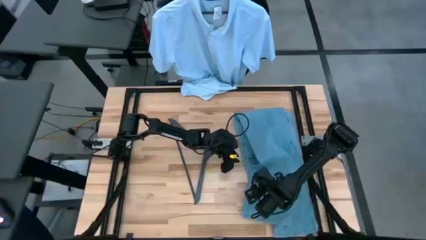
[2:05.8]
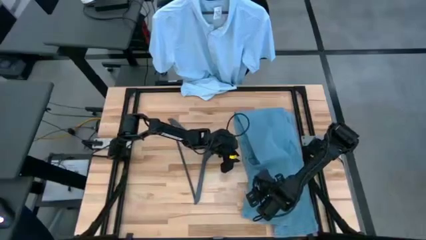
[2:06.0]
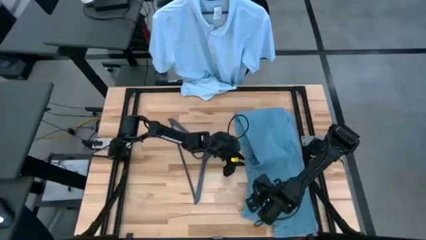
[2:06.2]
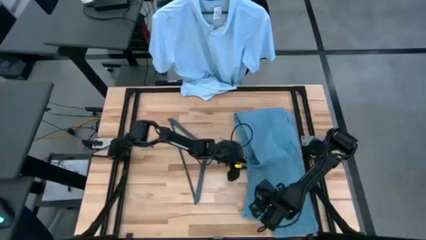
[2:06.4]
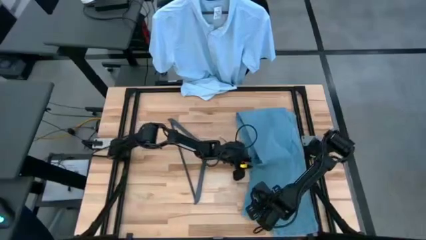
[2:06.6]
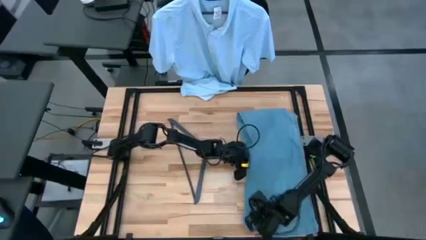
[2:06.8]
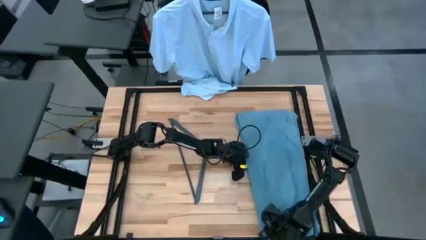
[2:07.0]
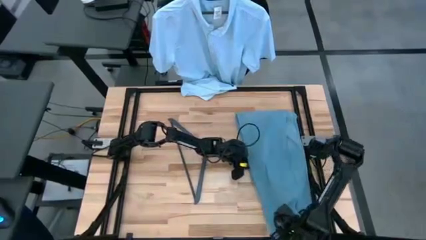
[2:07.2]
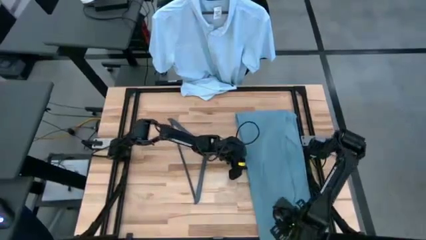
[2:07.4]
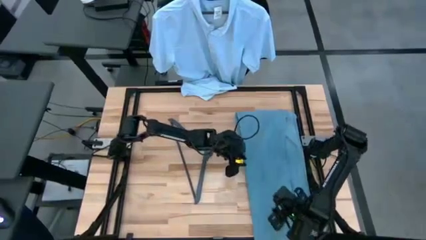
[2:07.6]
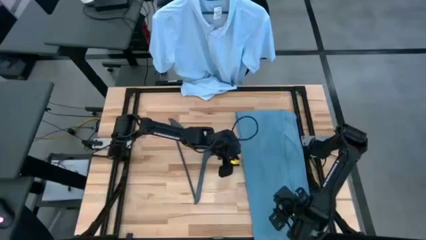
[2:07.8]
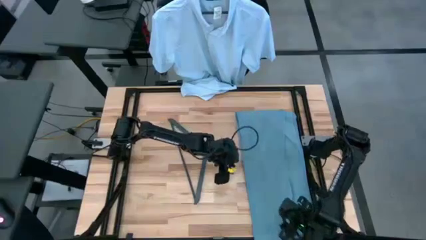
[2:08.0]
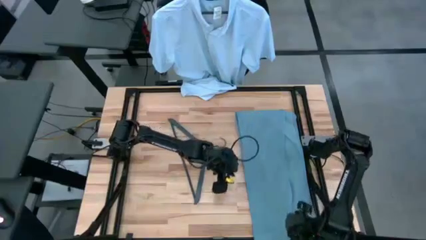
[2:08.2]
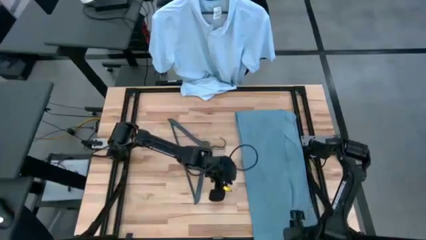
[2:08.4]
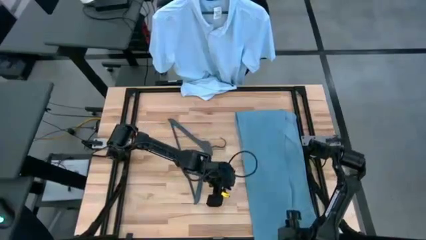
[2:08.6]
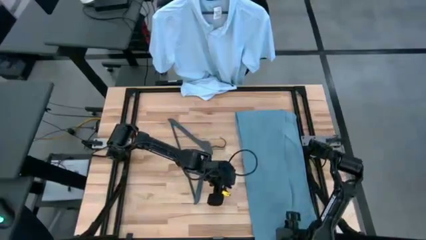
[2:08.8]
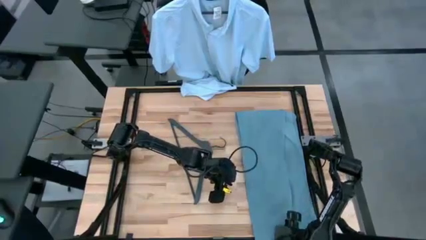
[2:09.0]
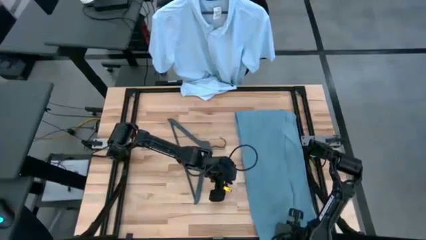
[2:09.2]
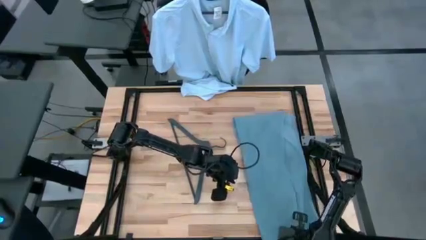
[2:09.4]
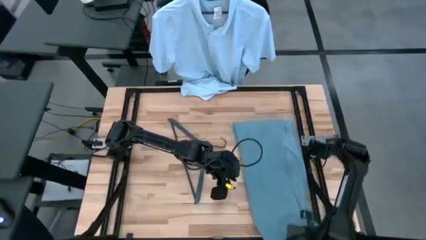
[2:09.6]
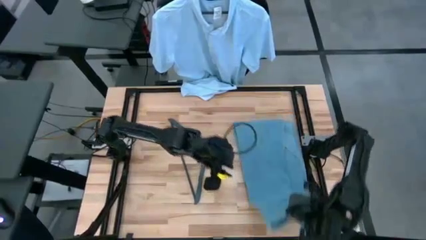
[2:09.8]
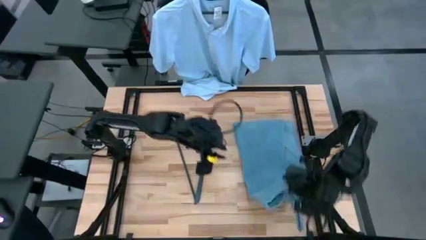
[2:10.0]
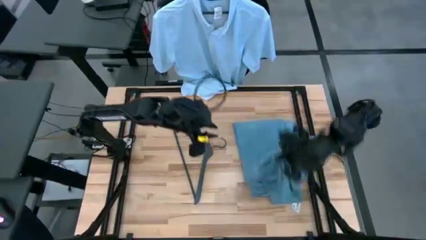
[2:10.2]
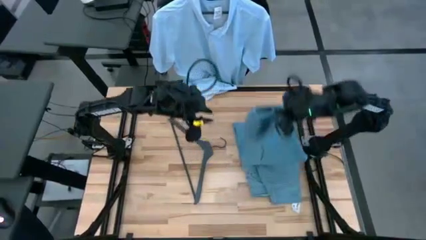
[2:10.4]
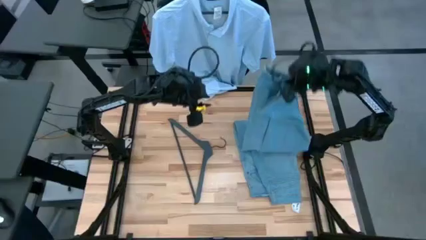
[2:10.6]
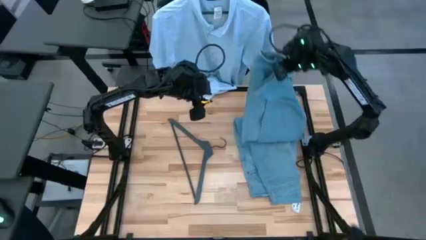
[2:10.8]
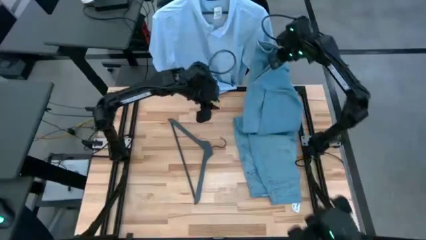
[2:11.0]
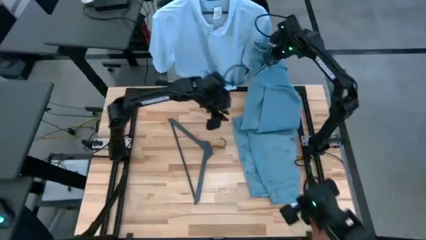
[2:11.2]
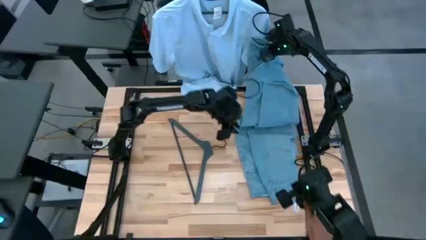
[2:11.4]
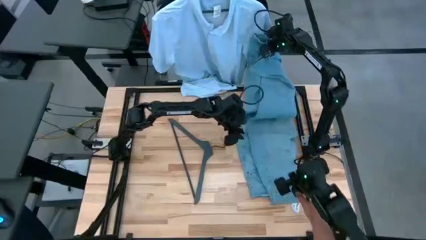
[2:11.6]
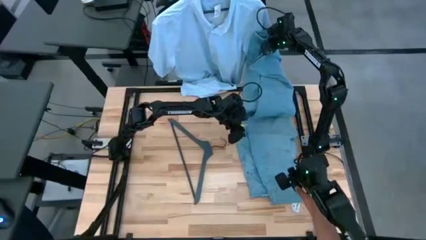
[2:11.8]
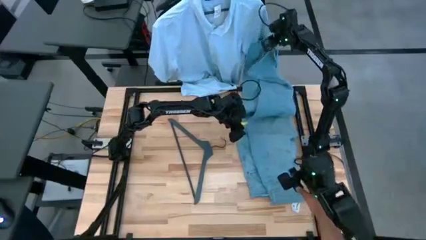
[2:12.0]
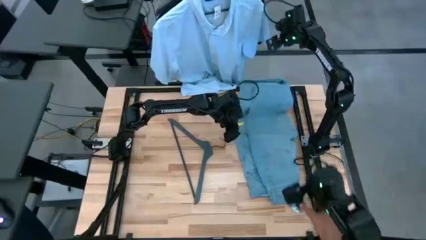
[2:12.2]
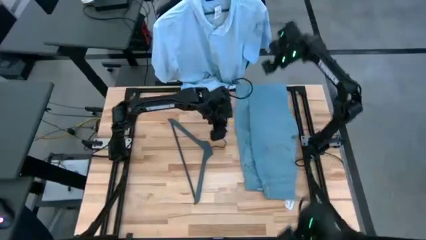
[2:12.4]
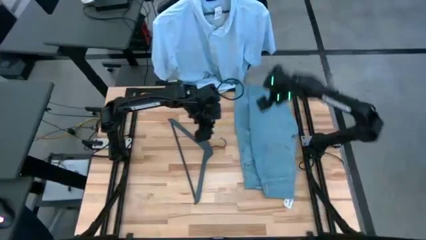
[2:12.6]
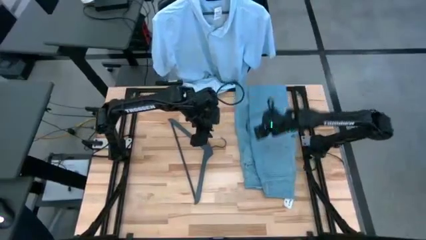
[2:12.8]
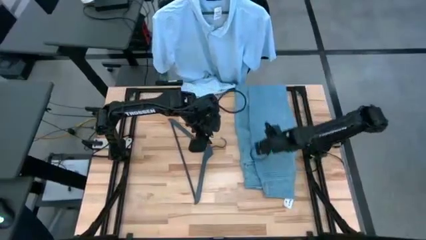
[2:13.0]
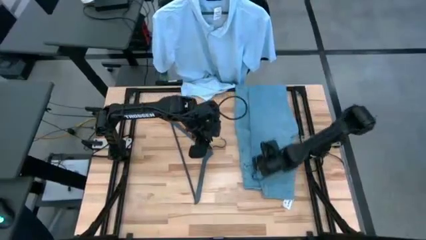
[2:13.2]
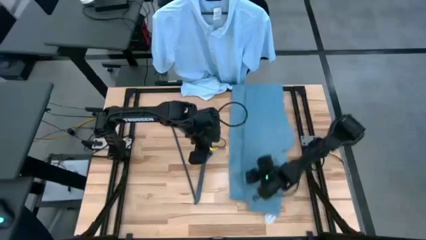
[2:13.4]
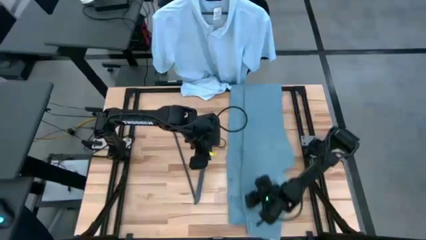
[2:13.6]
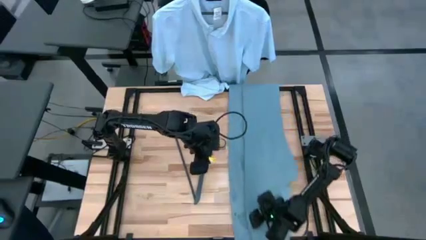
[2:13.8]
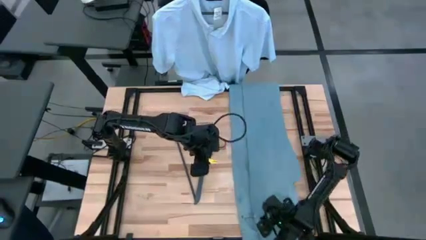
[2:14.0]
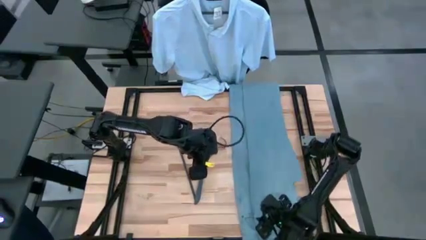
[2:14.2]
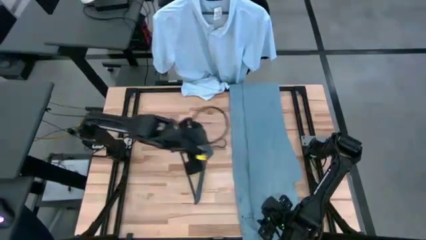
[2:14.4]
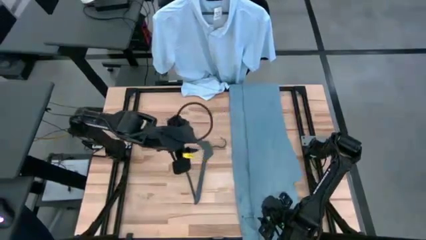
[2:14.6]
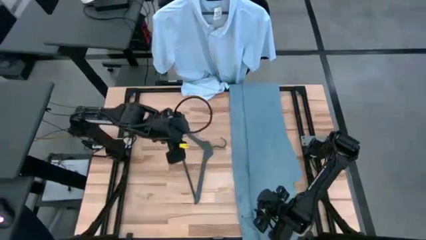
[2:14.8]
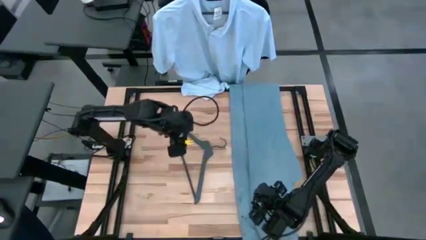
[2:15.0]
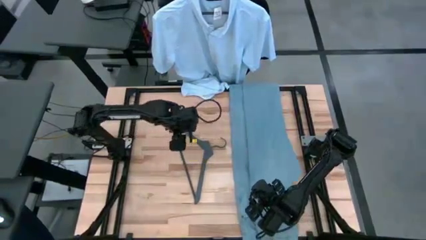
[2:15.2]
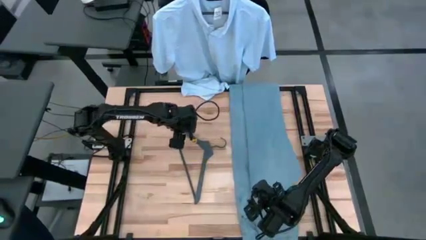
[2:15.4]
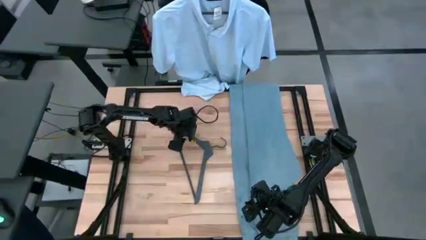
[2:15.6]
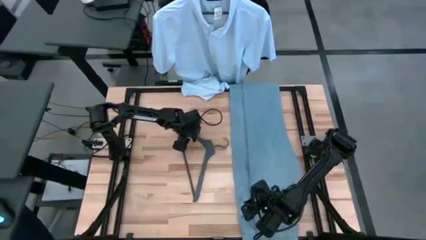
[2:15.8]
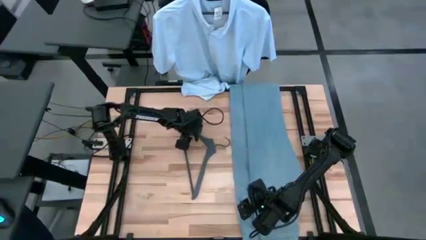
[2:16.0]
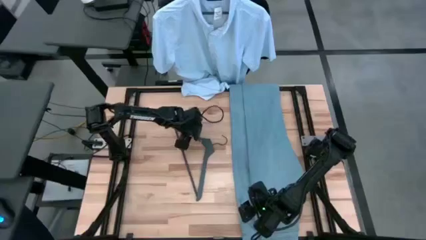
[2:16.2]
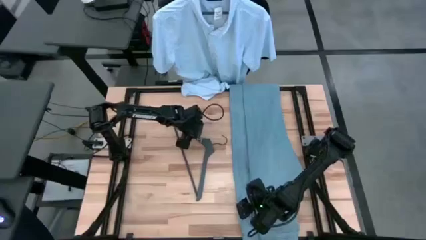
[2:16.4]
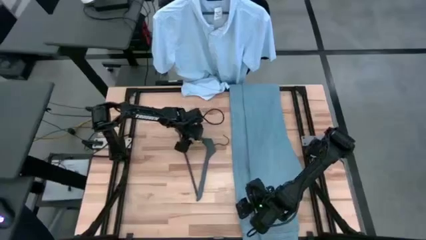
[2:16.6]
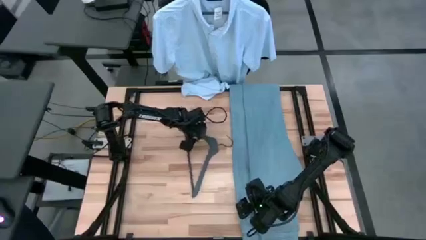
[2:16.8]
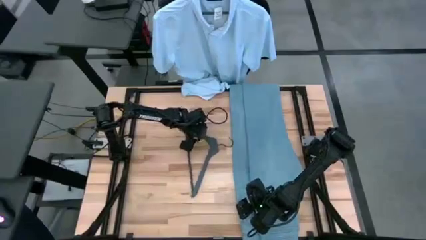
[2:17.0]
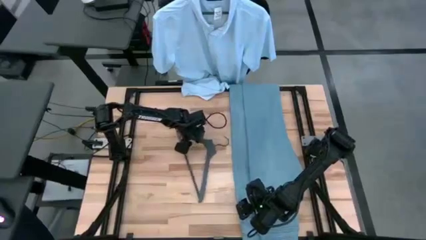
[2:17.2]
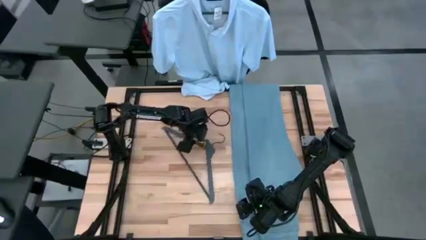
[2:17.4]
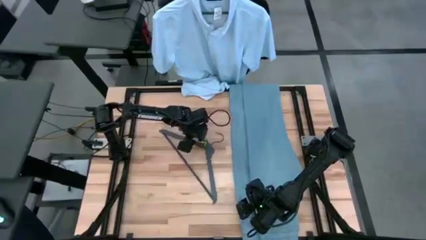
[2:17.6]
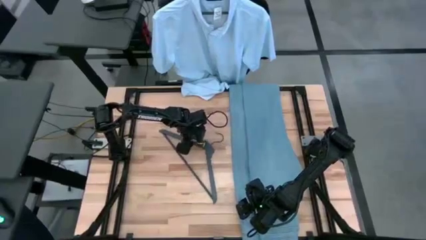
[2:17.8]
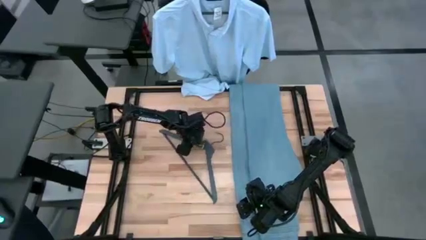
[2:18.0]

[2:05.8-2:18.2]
Task: Hang clothes
Insert the blue jeans on the grey hanger

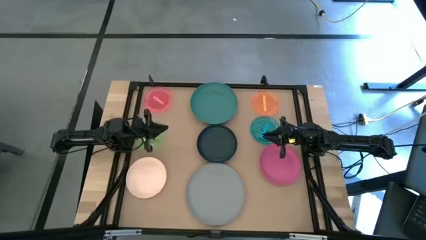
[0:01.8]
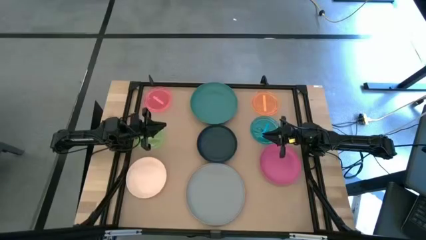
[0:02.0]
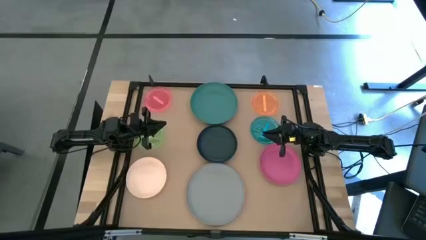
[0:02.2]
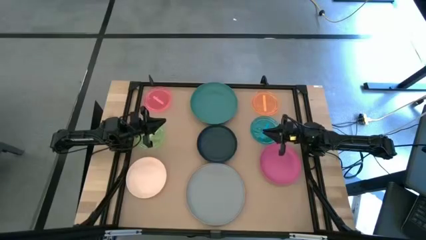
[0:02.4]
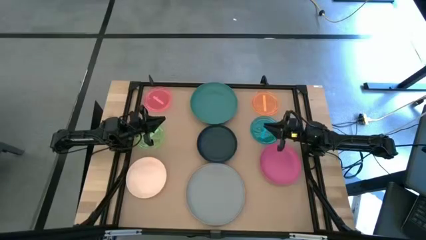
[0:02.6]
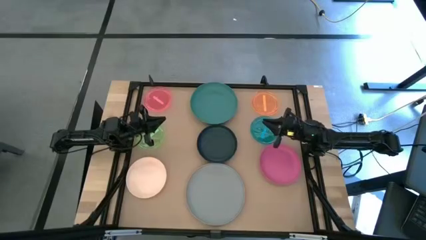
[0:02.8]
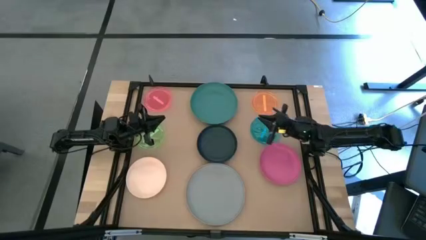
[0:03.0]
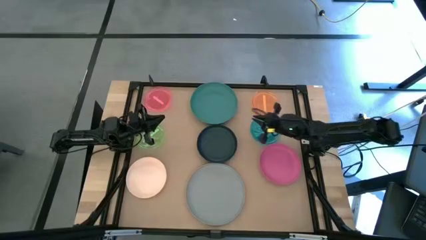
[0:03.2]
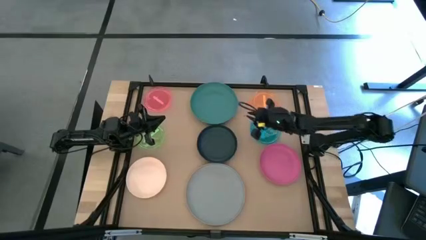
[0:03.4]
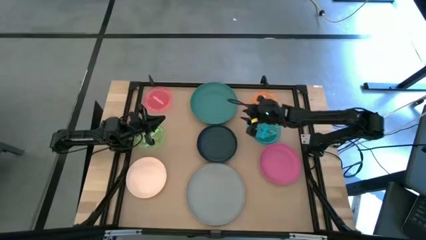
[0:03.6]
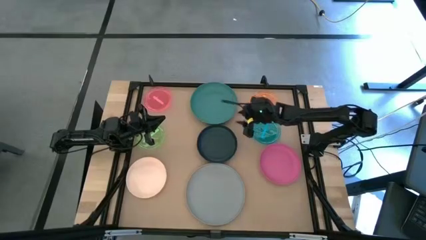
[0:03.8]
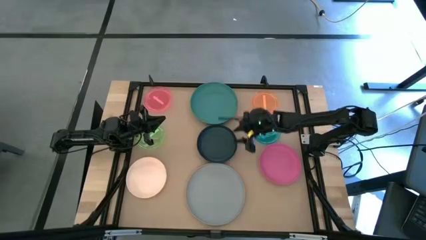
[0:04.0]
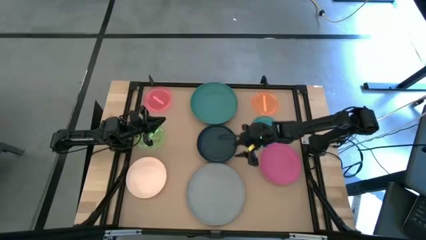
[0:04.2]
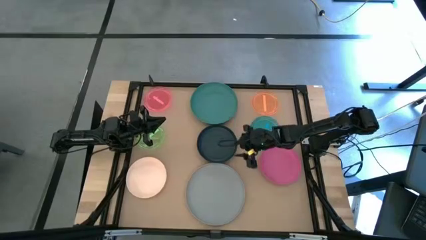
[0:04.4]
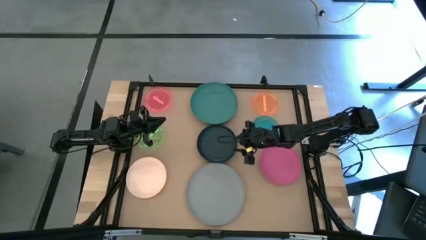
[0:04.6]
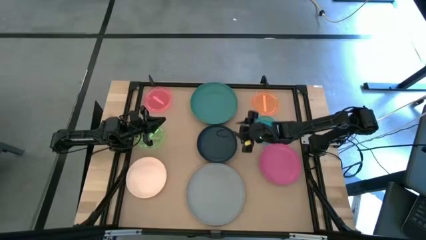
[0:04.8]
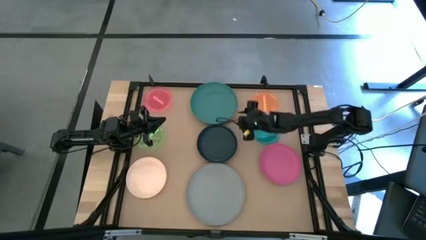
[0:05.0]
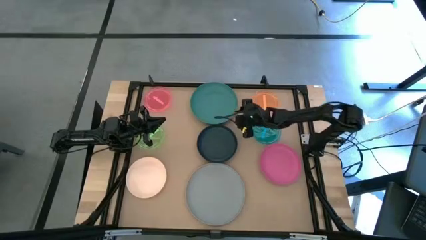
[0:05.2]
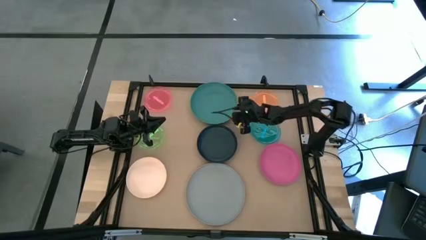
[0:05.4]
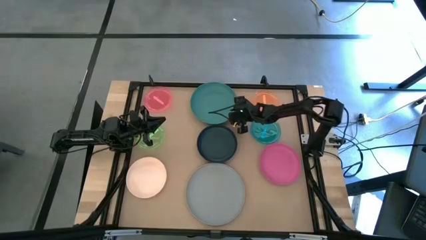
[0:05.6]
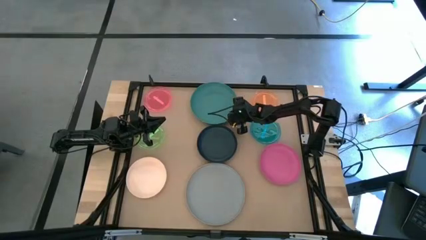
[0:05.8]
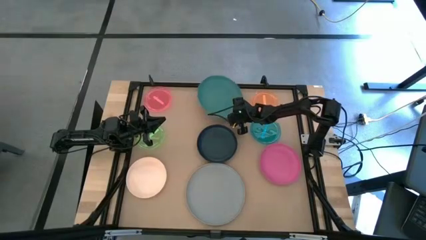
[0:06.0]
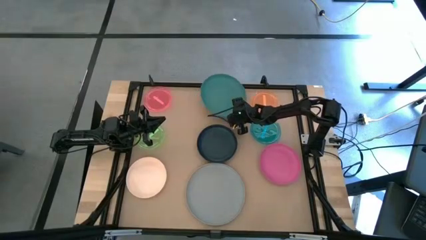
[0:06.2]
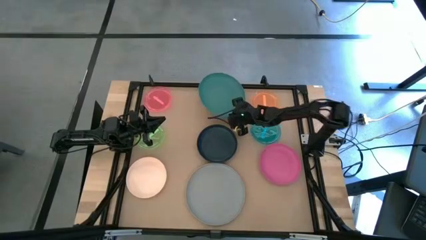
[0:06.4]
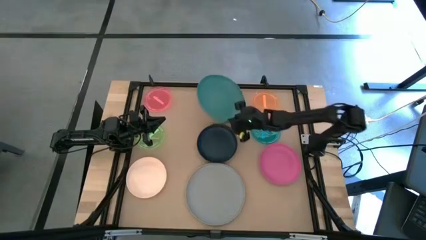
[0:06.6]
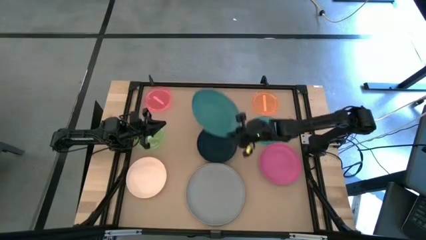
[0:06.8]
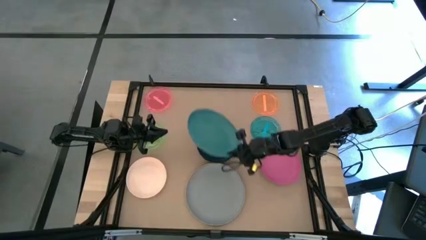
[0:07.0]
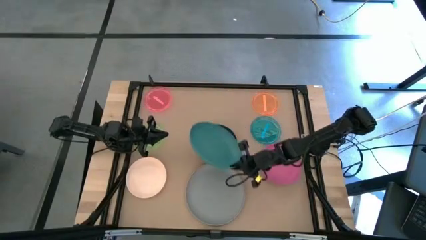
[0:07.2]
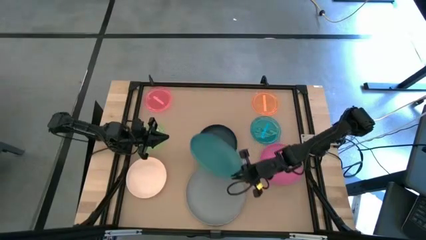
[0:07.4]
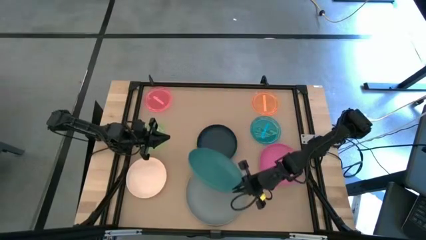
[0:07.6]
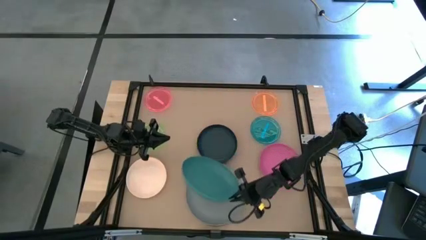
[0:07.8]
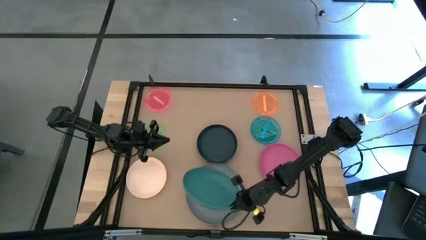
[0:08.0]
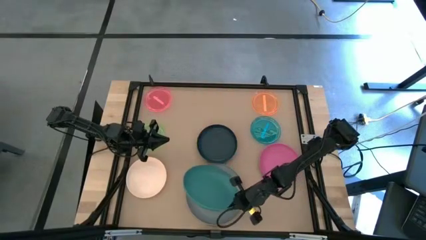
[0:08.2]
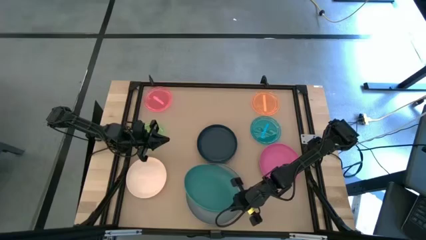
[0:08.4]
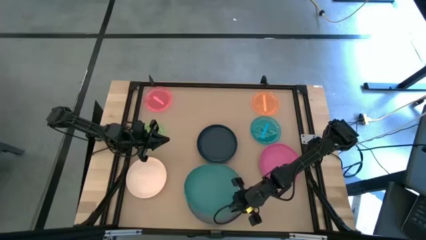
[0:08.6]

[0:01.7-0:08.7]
Task: Stack plastic plates
Stack the green plate on top of the gray plate
